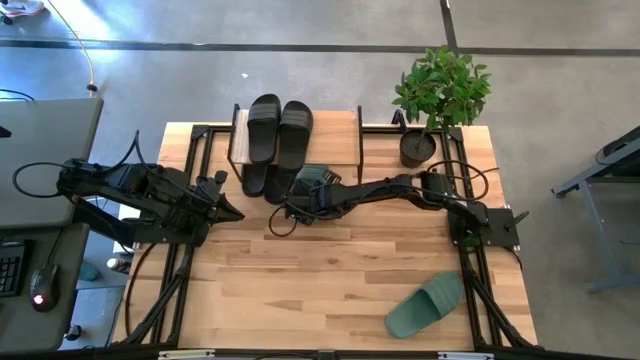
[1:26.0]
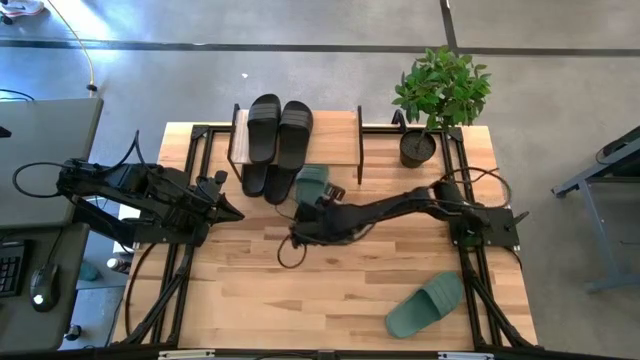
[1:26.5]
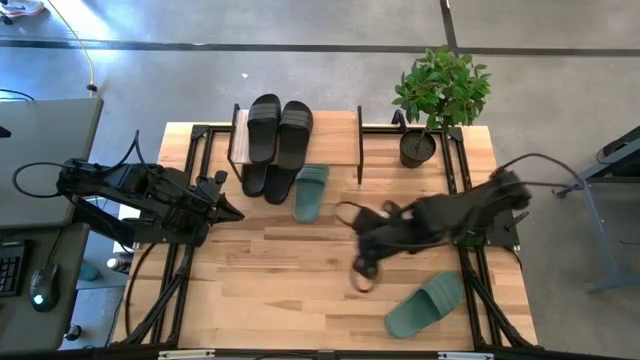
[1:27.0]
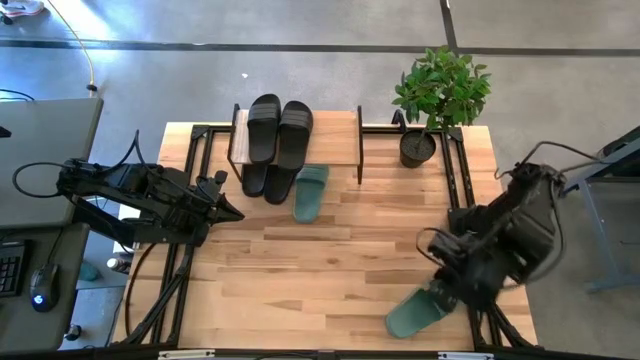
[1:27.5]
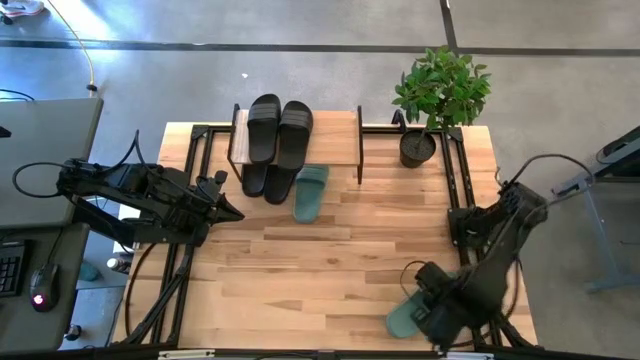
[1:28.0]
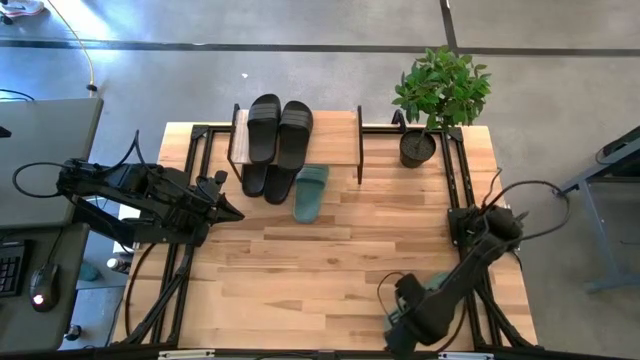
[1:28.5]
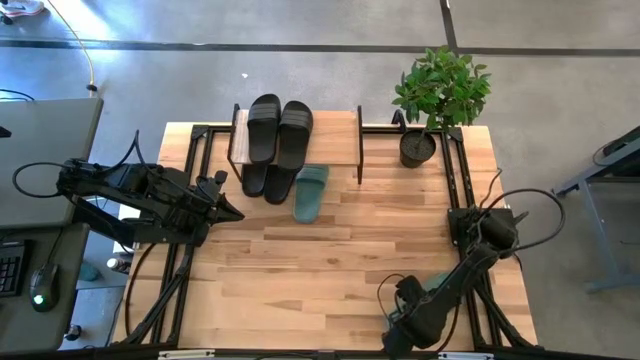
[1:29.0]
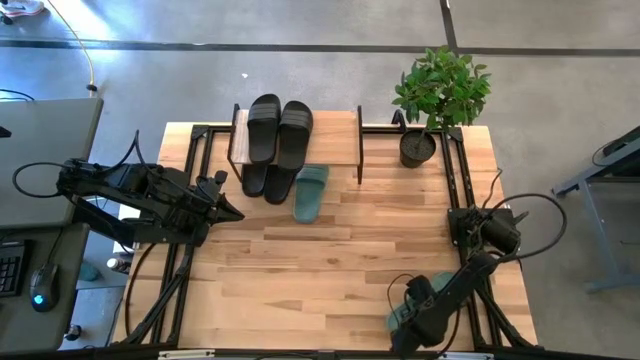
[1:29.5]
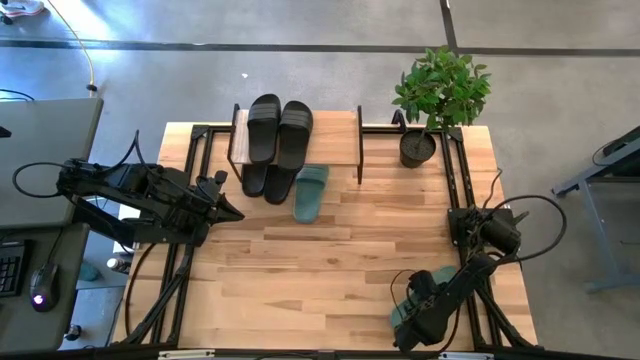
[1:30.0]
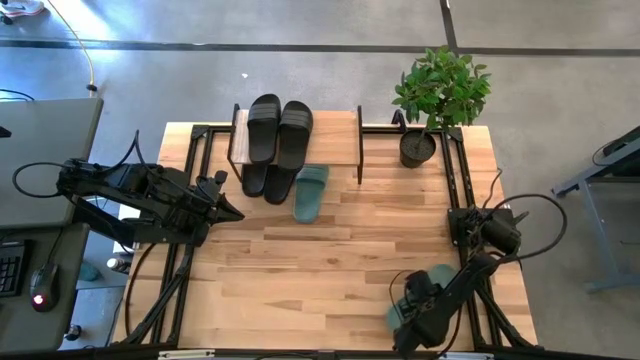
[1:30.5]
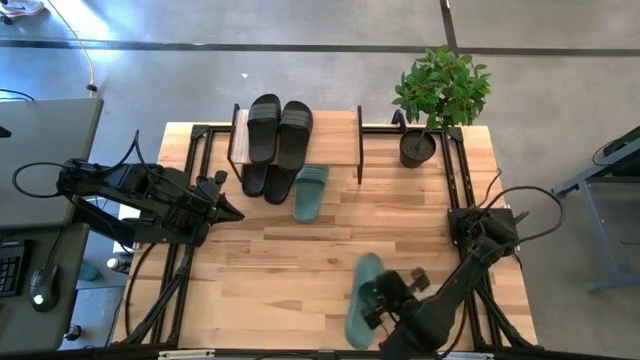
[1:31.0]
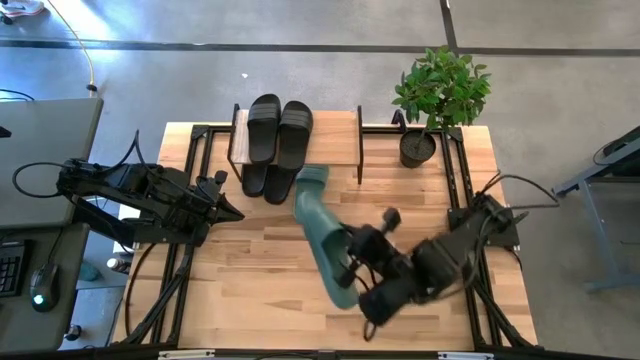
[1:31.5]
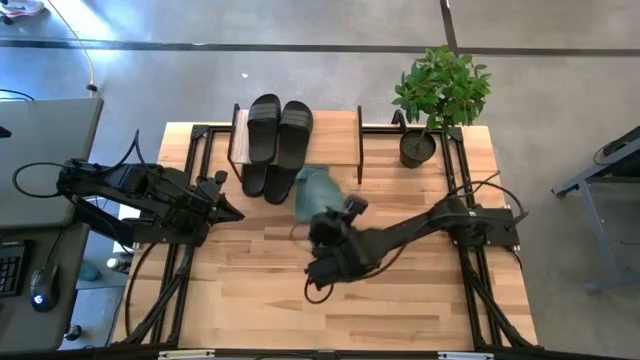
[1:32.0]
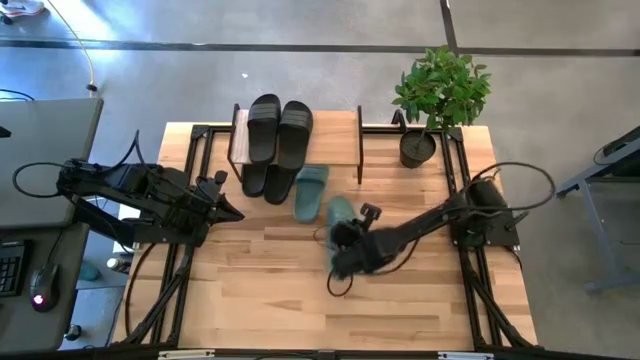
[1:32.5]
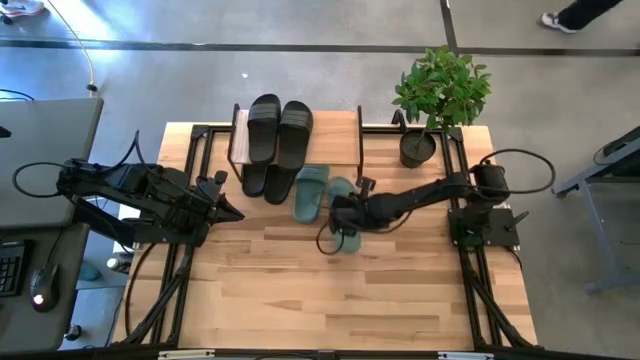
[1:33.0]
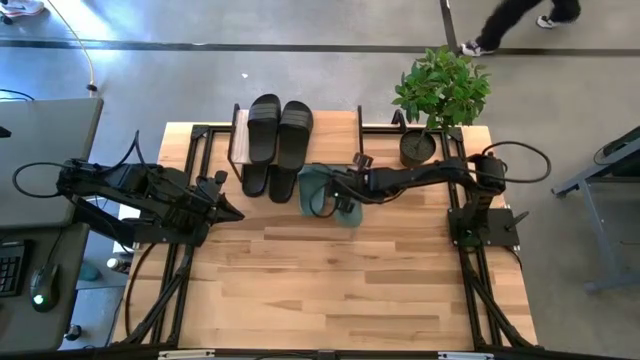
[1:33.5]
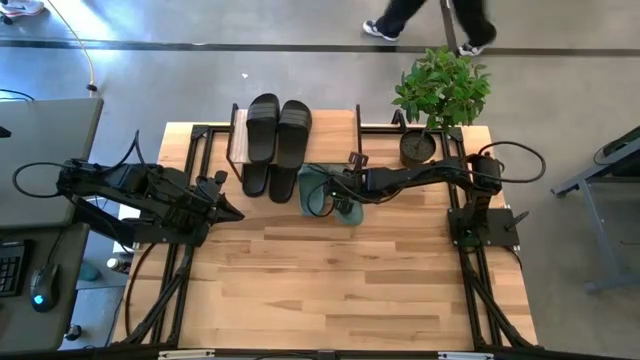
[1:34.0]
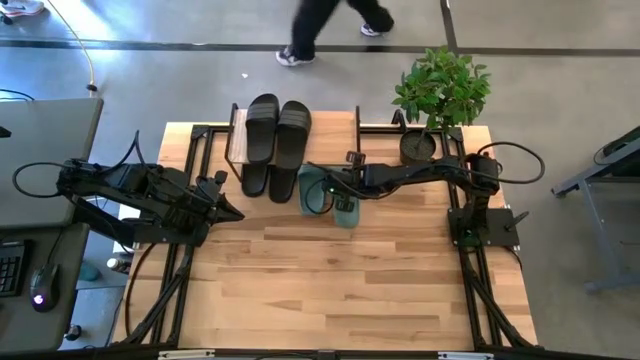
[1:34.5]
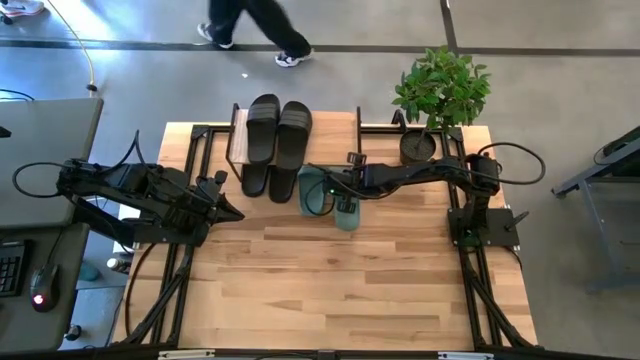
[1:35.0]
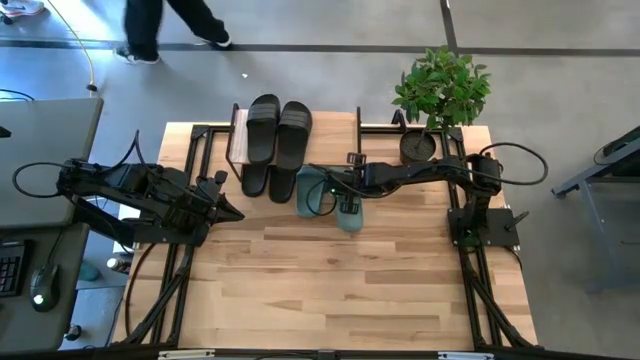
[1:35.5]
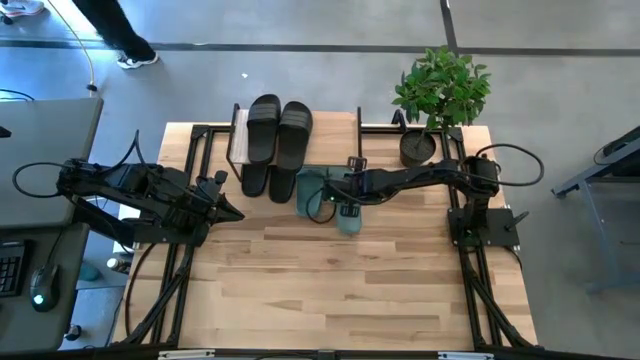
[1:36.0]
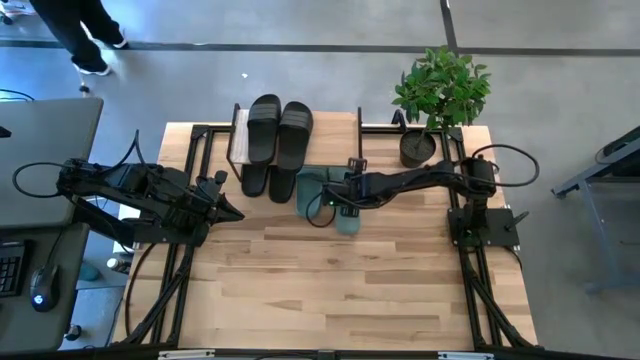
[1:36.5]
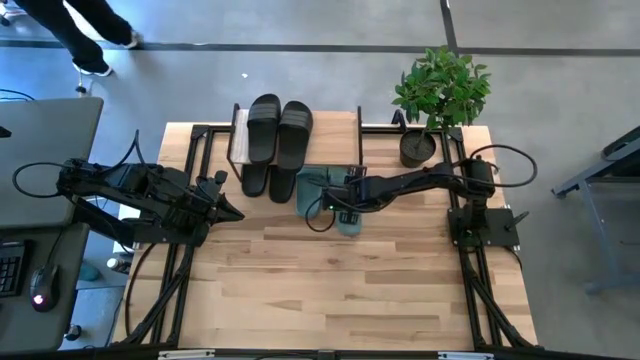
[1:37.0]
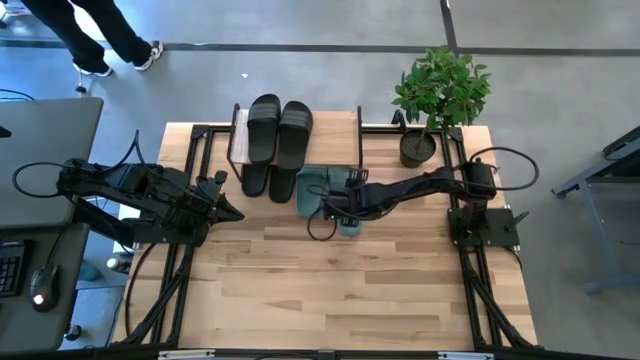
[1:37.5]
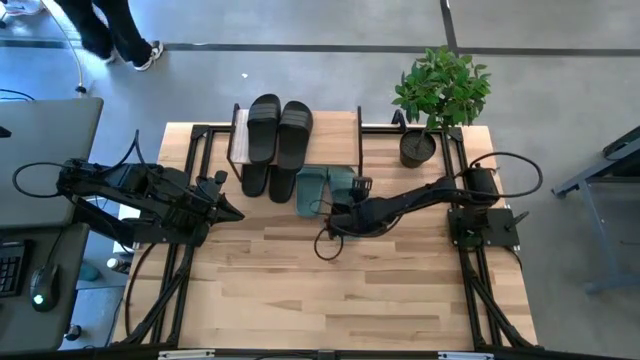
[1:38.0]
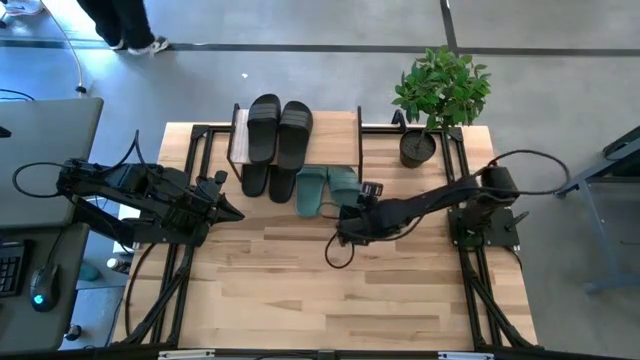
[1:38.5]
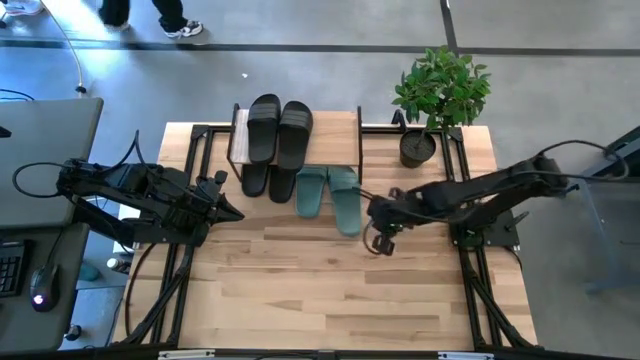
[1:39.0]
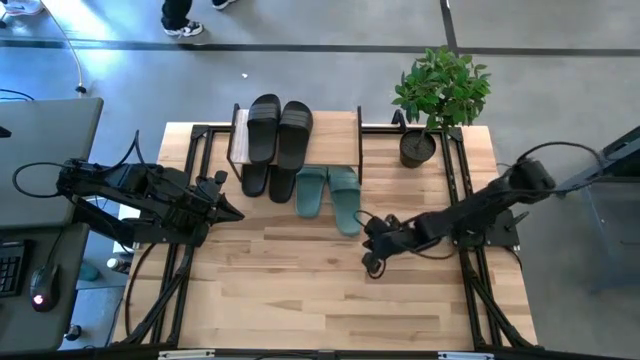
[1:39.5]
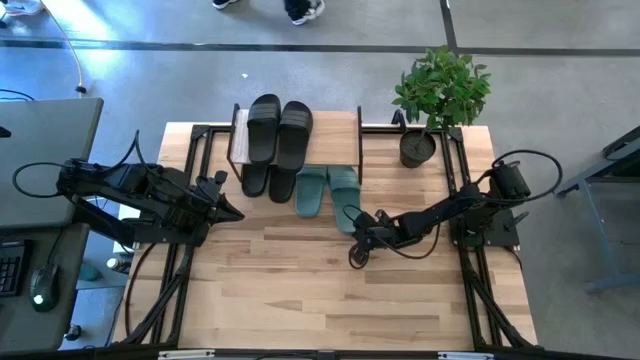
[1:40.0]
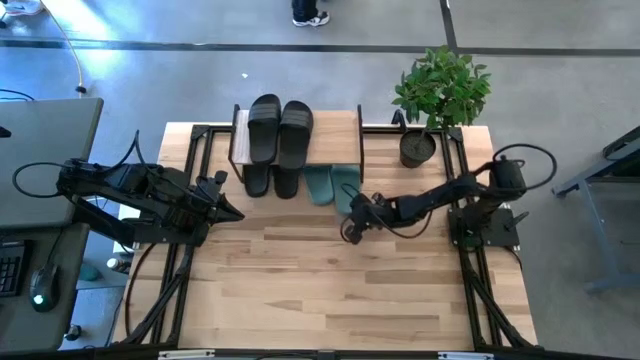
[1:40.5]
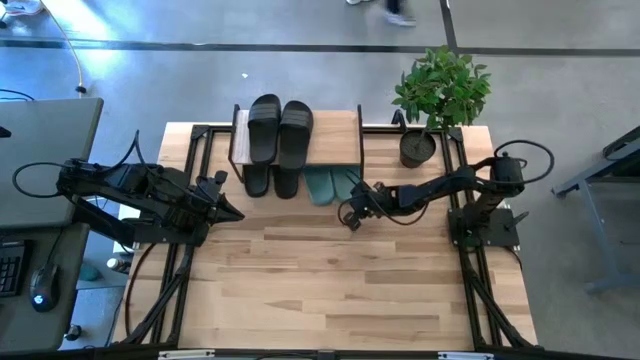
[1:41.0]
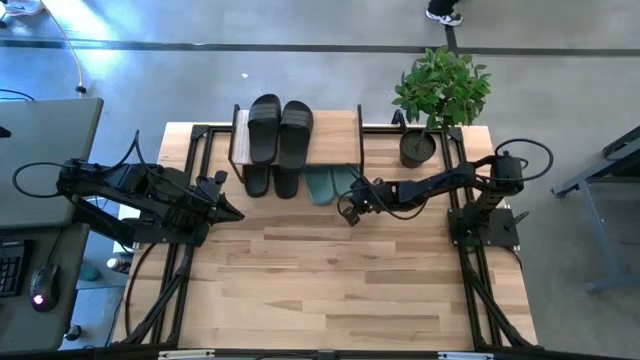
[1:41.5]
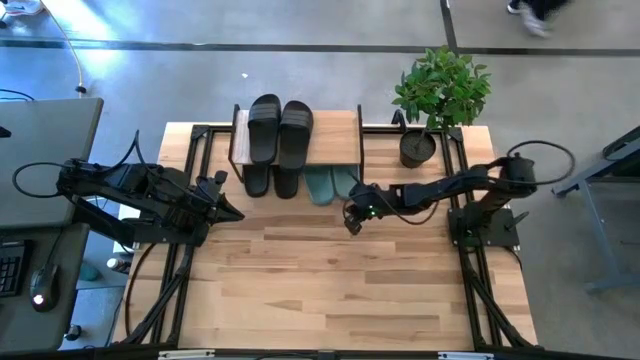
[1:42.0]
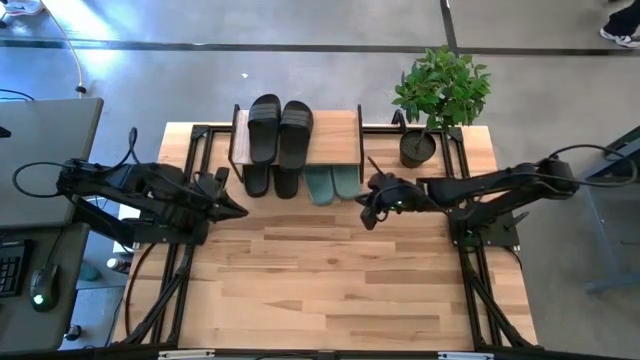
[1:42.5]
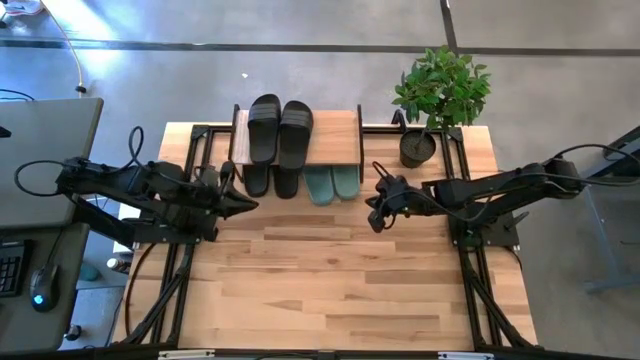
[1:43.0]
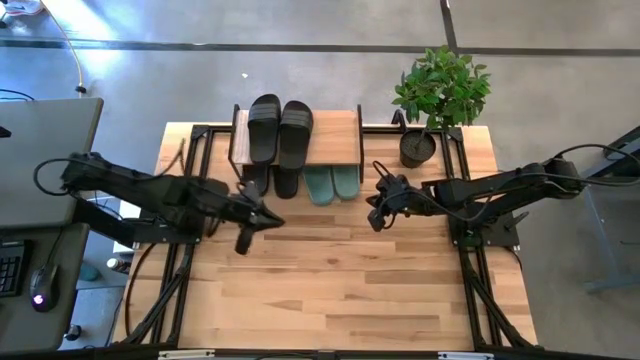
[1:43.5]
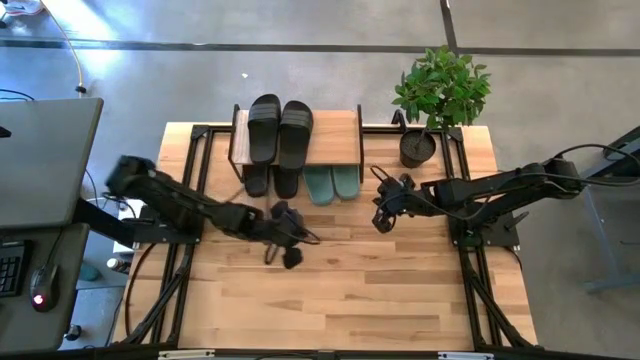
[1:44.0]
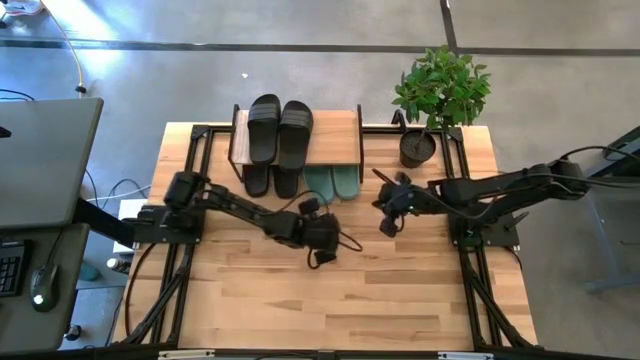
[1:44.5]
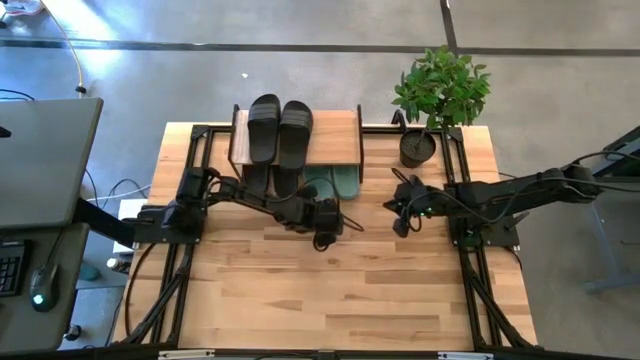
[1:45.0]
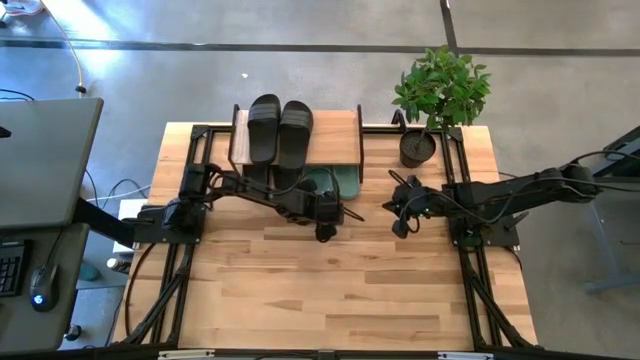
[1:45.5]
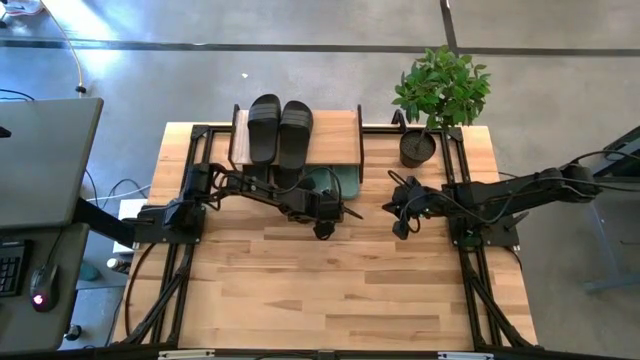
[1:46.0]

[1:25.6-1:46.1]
Task: Pick and place slides into the shelf
Put the blue slide under the shelf

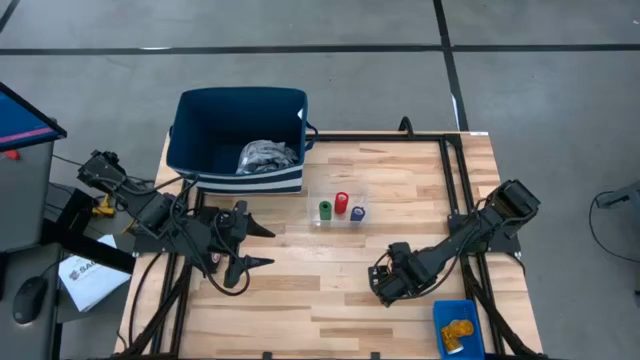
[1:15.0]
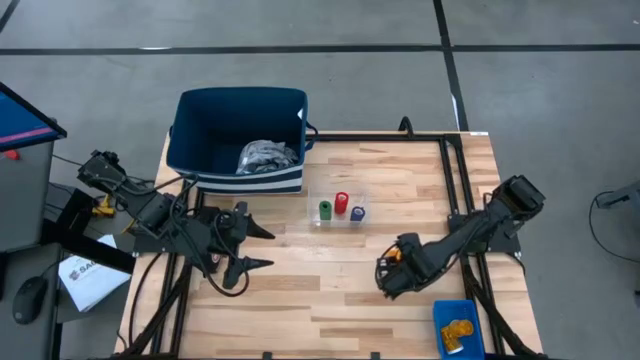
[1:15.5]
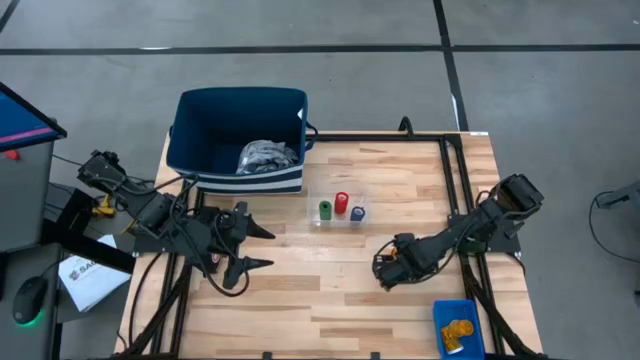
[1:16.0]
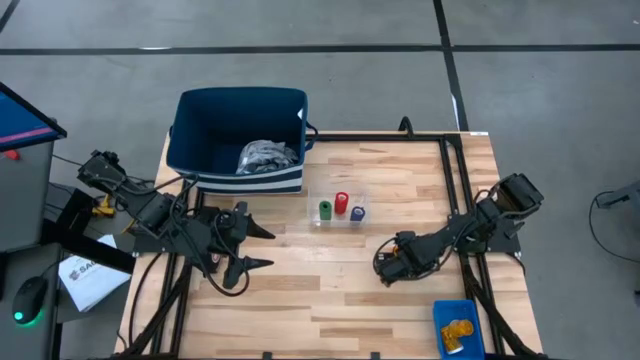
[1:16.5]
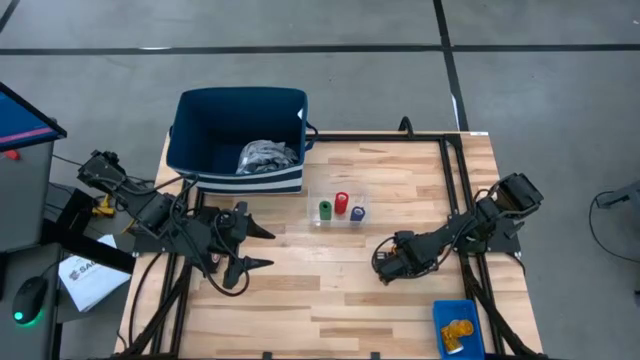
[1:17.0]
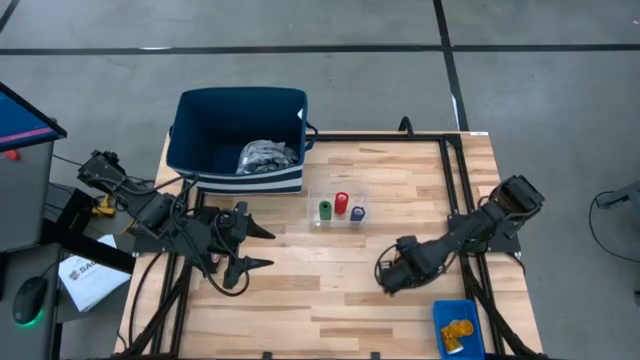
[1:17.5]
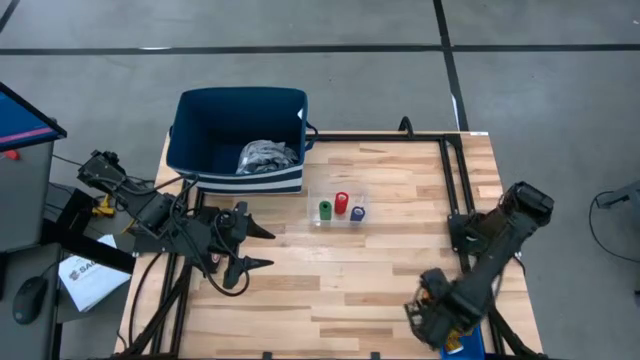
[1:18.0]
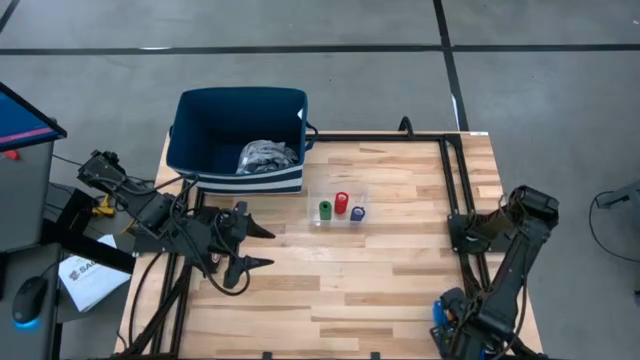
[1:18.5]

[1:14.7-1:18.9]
Task: Pick & place medical supplies in basket/bin
Put the orange pill bottle into the blue basket
